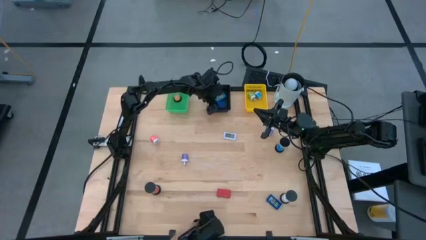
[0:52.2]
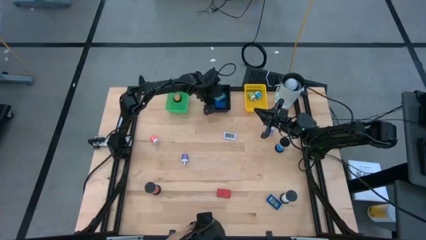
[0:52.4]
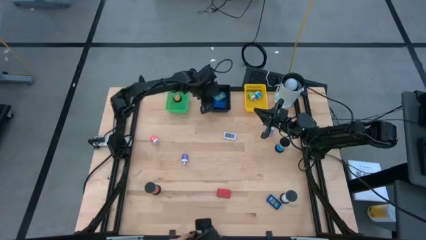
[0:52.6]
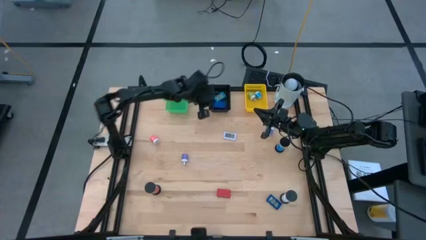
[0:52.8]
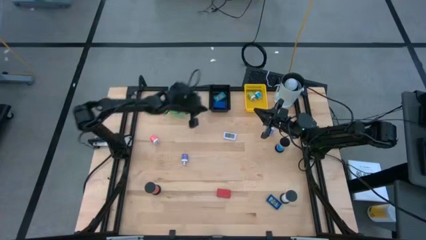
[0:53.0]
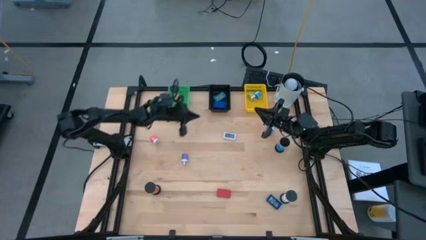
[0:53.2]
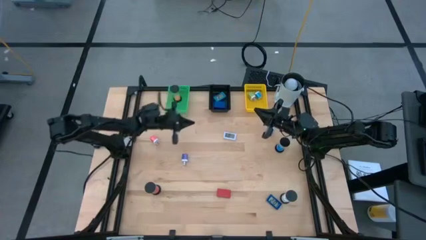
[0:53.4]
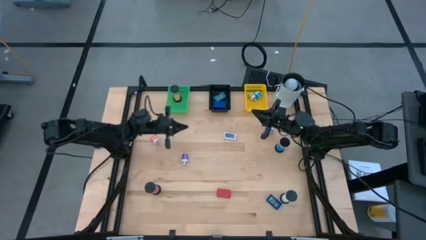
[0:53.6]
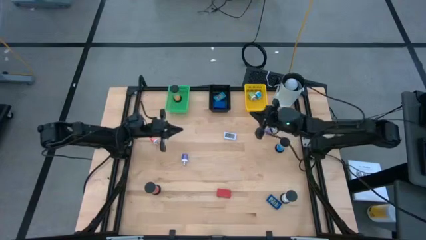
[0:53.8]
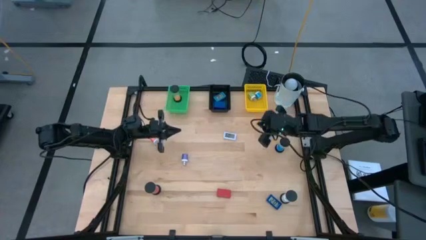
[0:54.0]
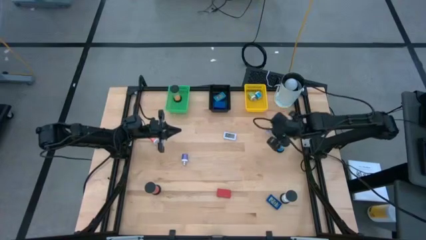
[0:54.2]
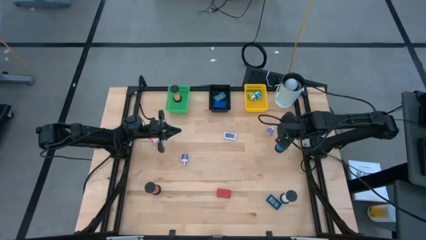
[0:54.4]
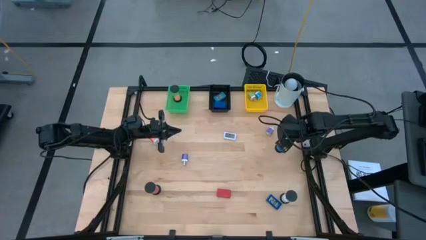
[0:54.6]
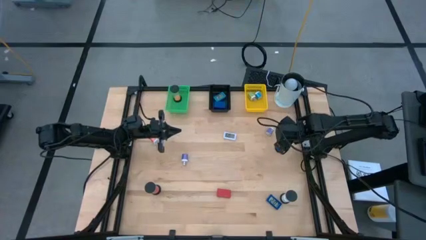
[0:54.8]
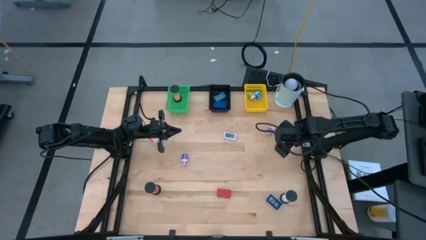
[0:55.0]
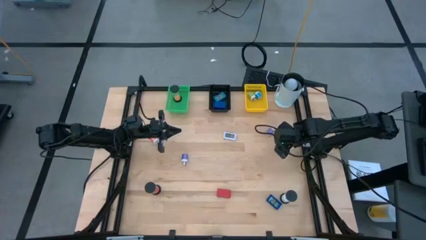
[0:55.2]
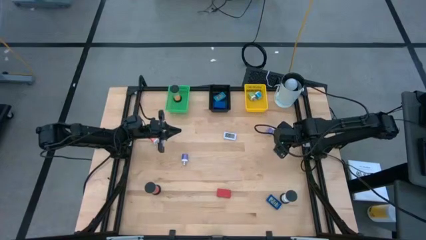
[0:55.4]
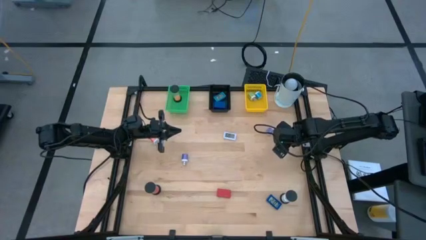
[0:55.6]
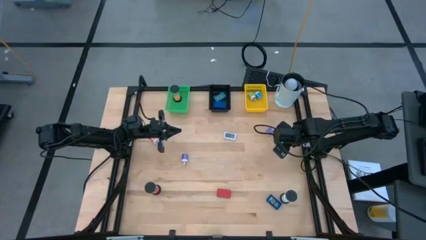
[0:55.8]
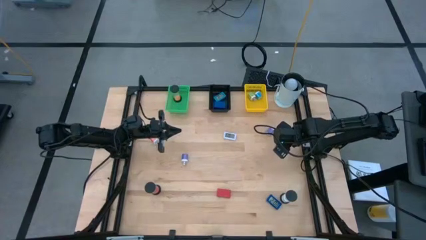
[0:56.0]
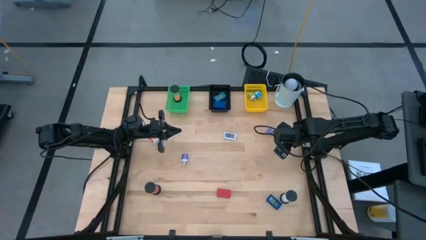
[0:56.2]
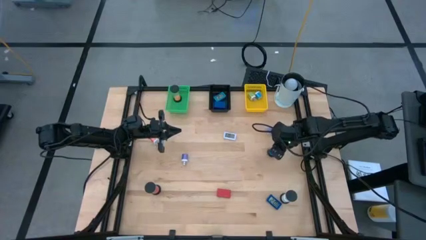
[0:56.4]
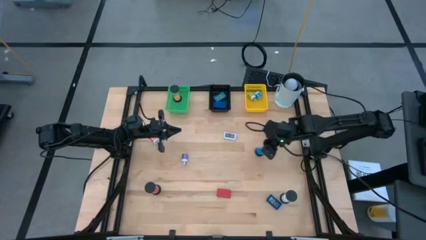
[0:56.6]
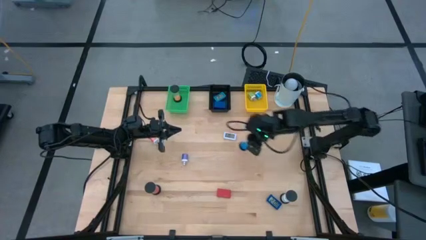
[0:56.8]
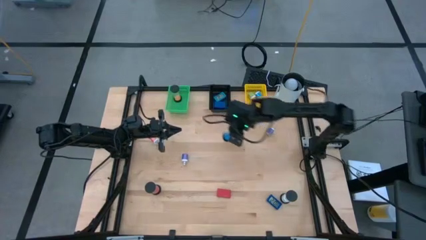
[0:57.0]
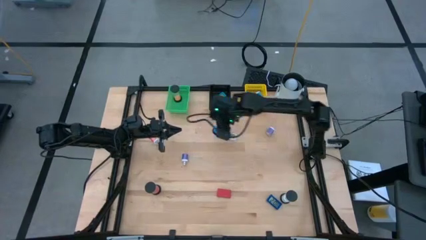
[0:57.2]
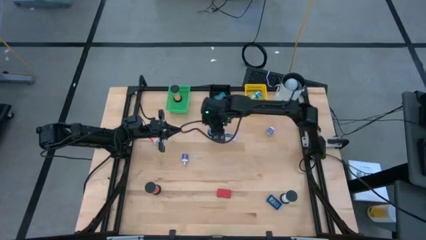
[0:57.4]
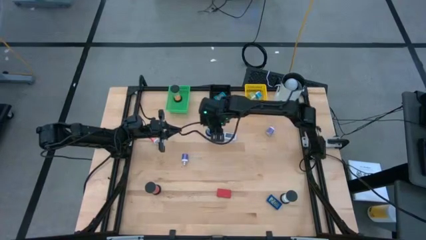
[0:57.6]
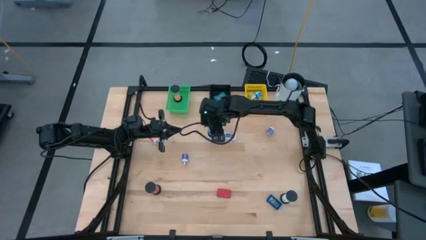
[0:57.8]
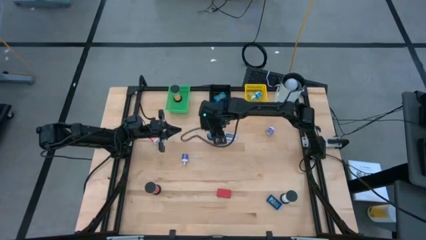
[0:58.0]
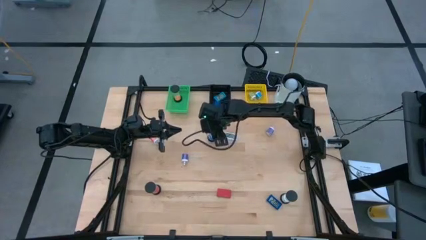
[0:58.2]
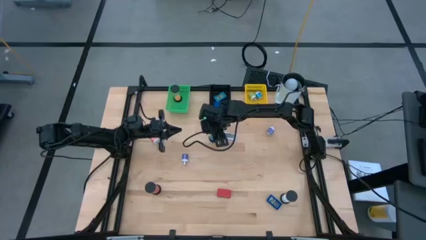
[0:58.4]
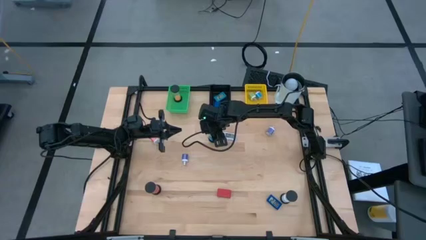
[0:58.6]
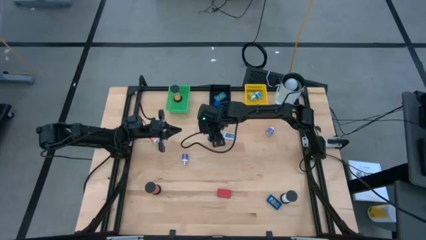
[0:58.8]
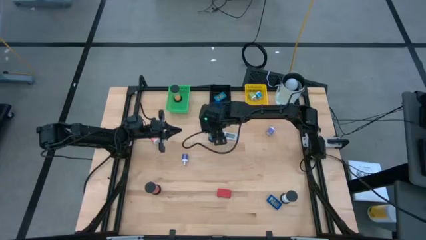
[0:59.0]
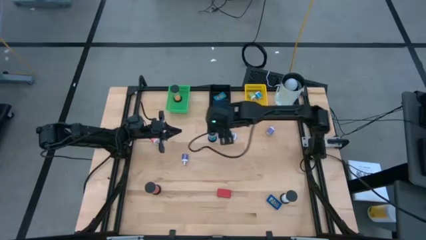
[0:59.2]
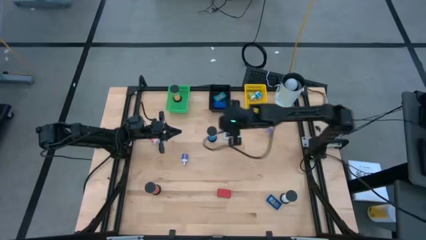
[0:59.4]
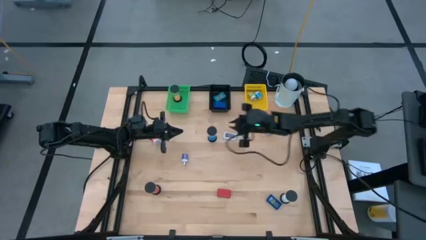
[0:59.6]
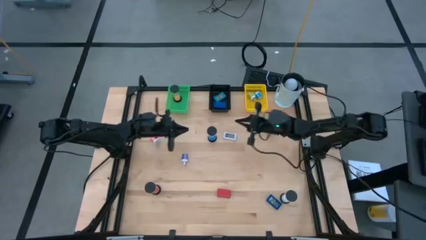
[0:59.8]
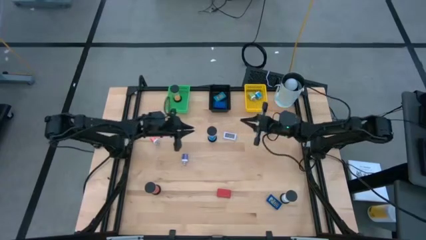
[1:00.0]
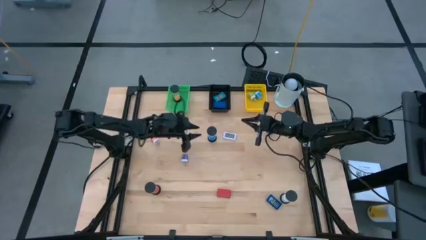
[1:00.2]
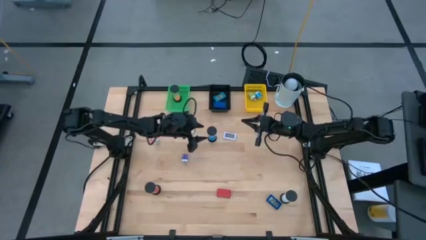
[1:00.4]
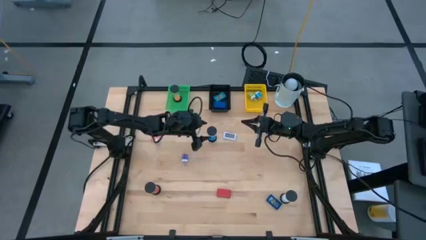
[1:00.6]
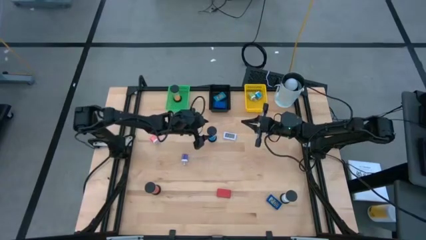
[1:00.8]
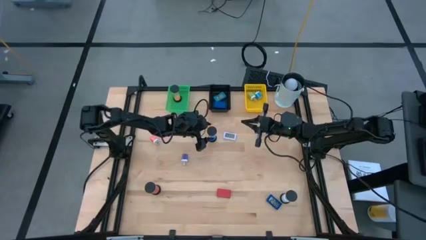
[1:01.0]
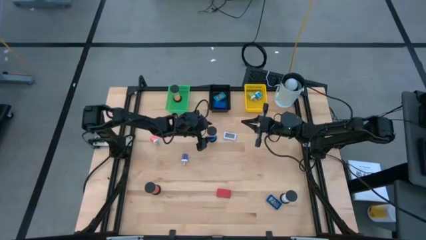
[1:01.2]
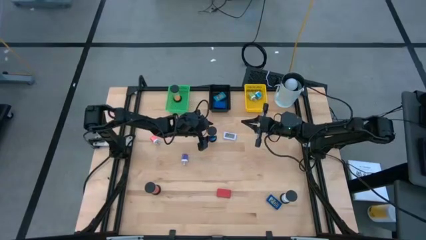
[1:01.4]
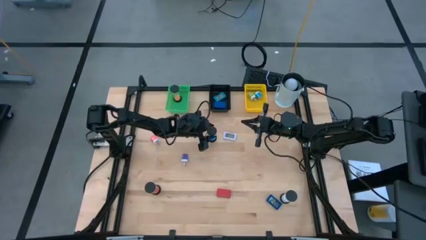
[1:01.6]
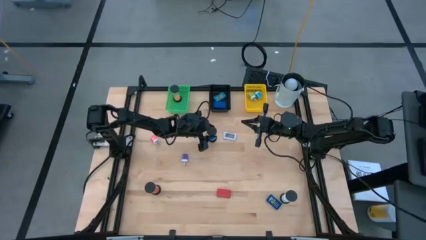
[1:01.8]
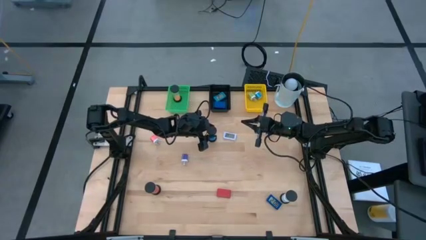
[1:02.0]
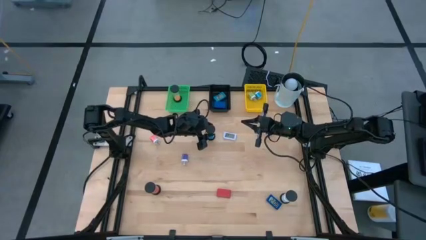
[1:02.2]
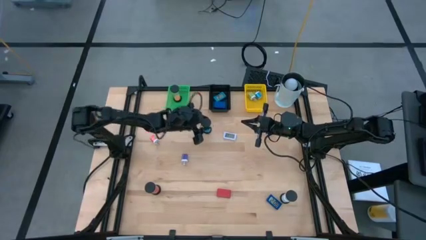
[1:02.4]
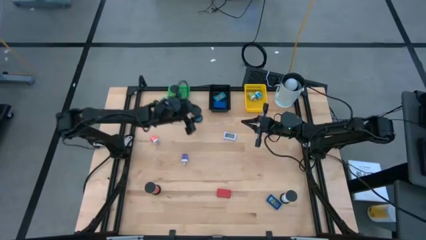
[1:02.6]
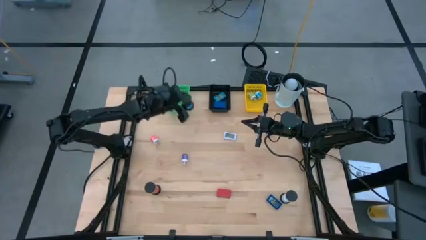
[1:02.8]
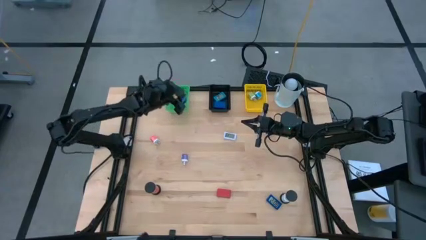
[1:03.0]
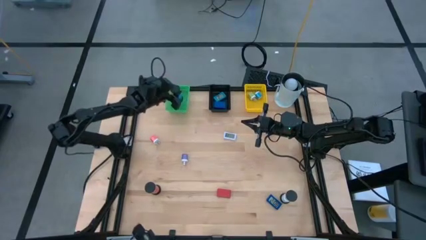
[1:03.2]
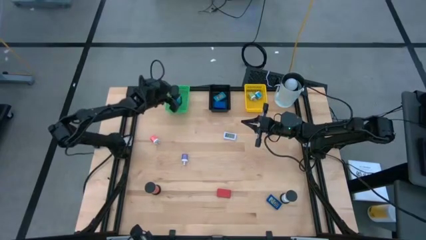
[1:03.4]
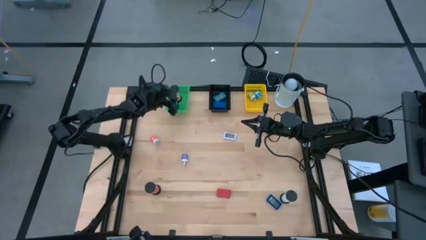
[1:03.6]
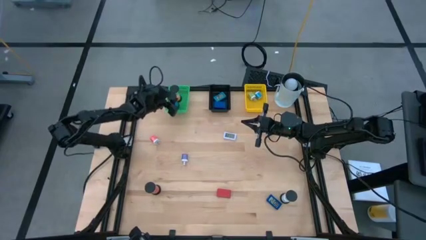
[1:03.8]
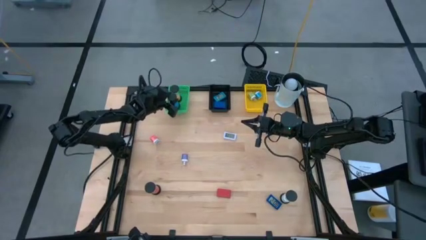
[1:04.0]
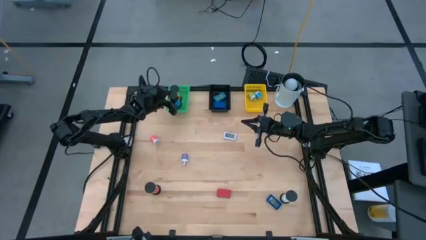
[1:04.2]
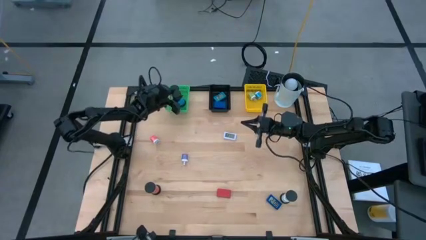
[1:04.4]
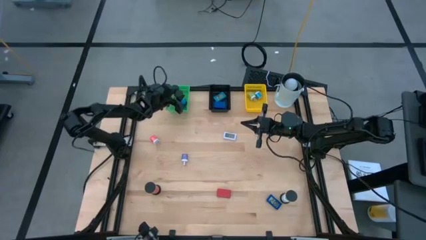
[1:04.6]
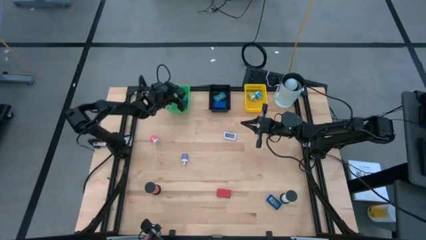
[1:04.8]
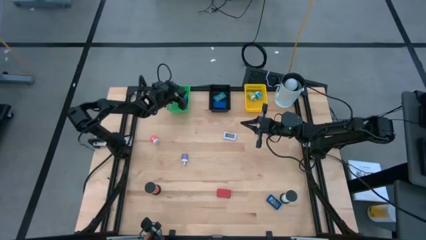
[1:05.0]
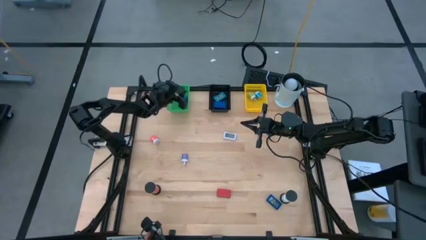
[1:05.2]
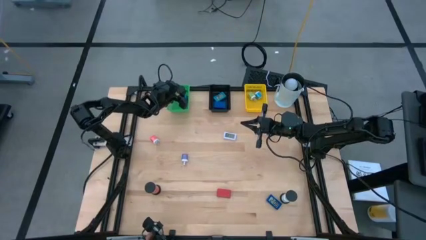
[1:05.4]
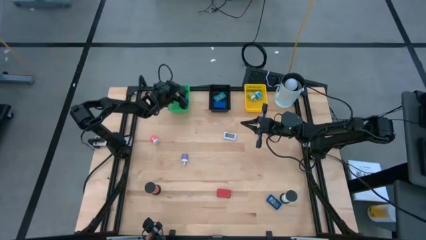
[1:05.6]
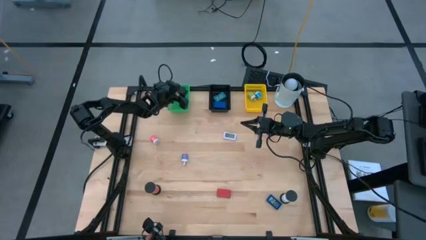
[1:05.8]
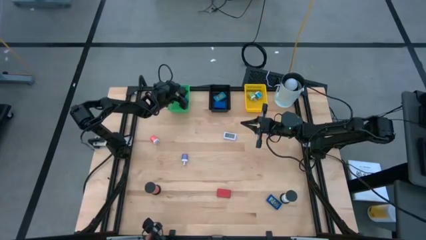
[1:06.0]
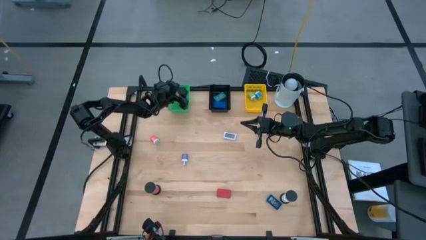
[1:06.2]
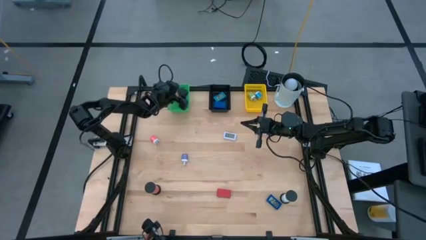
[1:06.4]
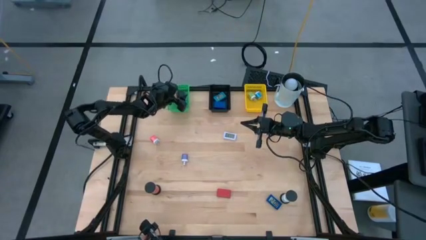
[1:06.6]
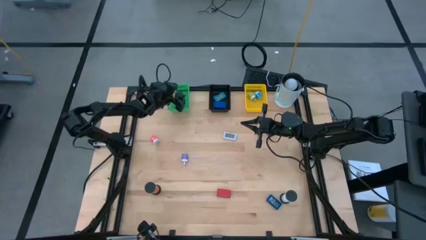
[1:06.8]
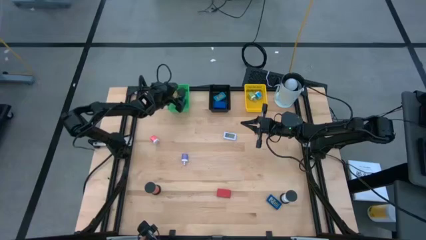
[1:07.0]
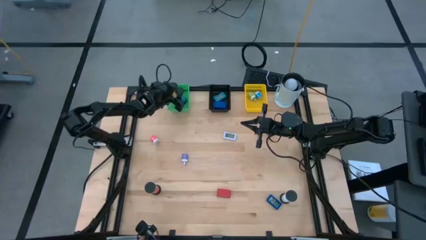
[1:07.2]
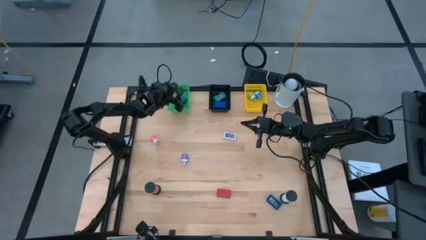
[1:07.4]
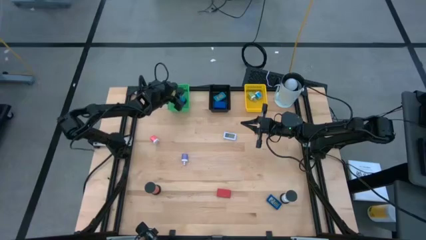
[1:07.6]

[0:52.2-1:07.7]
Task: Pick & Place Office items
Put the blue hourglass into the green bin

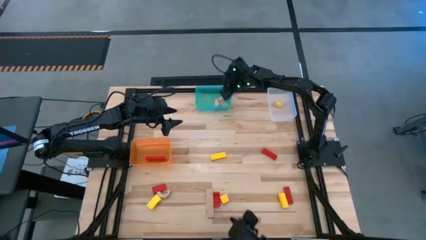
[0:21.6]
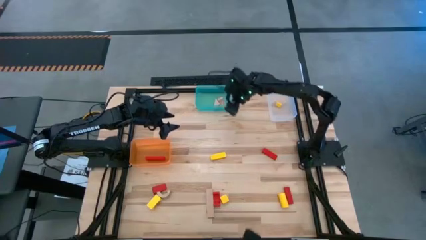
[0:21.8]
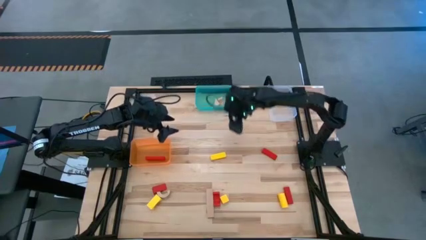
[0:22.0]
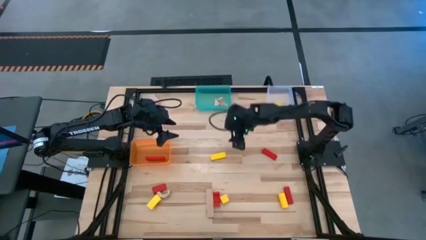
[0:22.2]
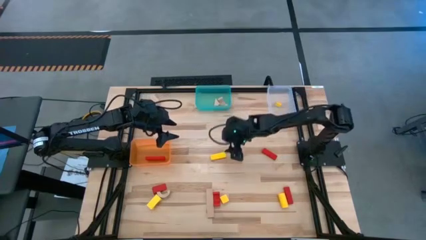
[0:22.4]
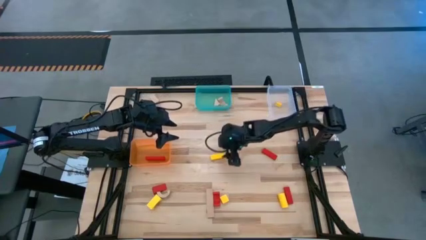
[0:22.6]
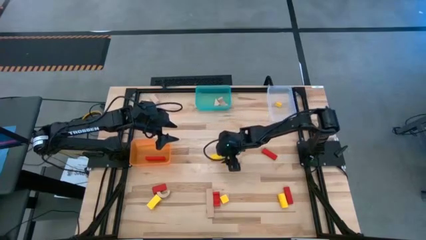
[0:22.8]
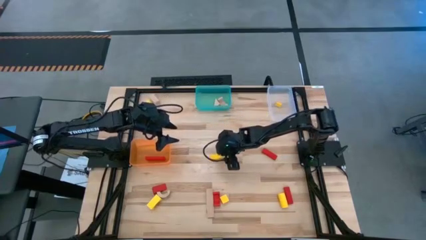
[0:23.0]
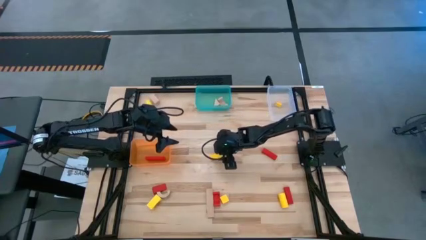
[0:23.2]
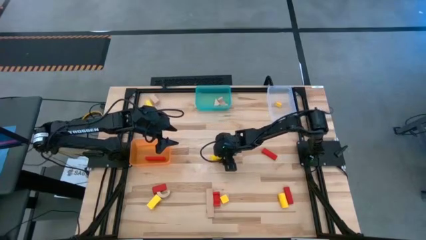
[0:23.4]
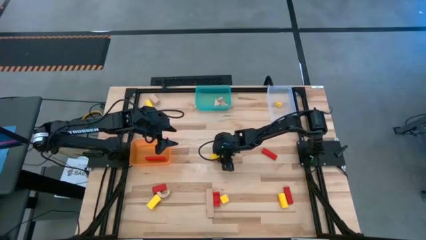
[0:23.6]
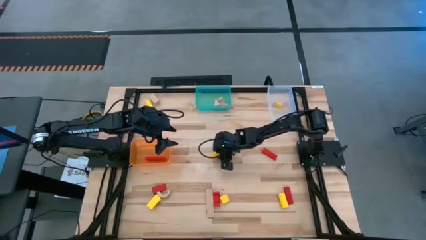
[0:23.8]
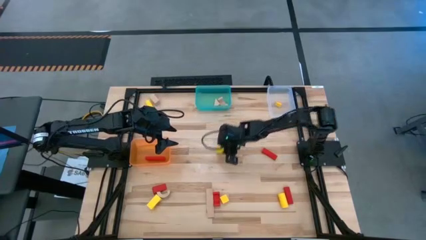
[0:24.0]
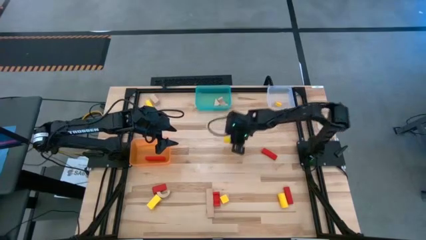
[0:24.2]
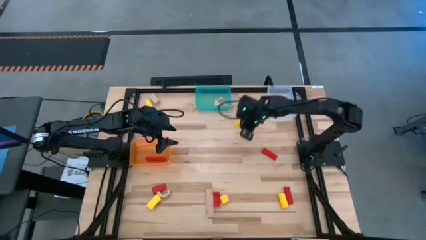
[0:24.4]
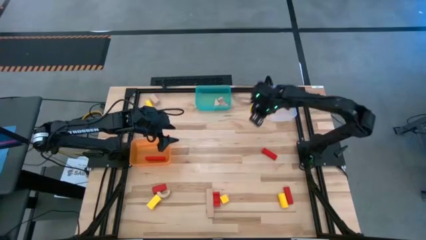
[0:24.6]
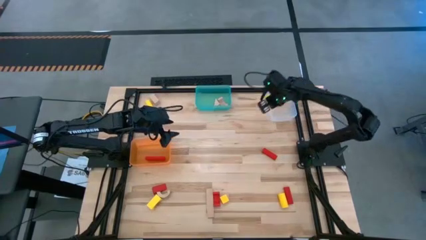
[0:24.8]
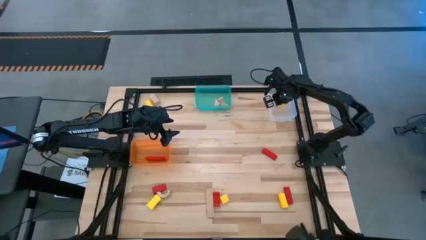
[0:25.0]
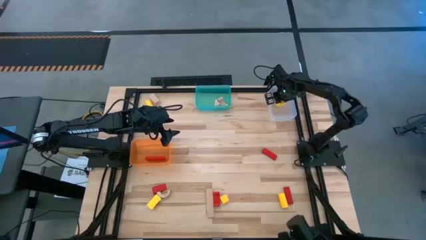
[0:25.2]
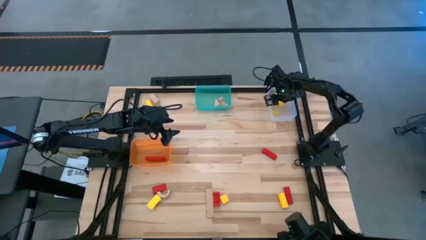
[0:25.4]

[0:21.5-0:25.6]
Task: Sort & place blocks by color
Put the yellow block into the transparent white bin
